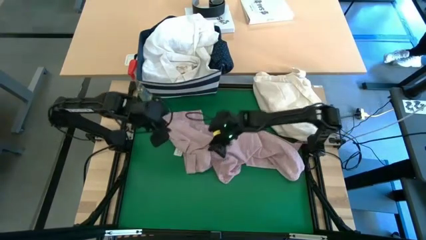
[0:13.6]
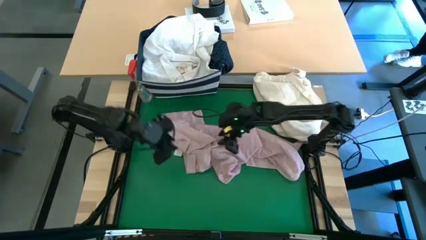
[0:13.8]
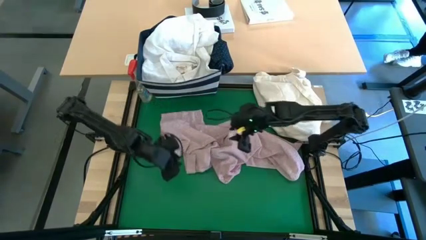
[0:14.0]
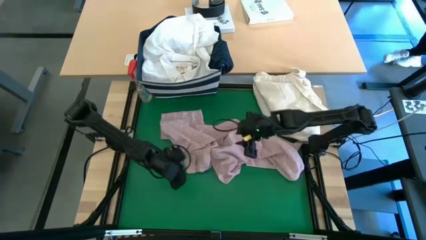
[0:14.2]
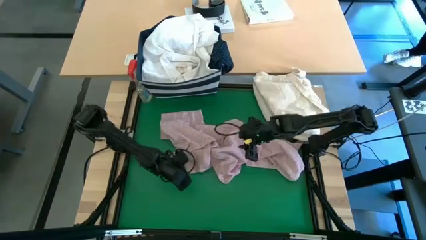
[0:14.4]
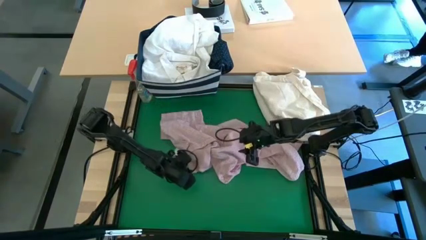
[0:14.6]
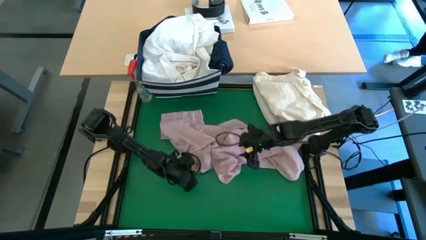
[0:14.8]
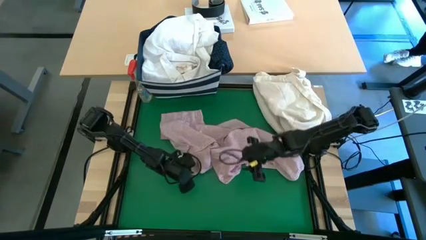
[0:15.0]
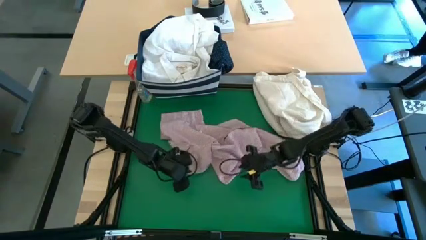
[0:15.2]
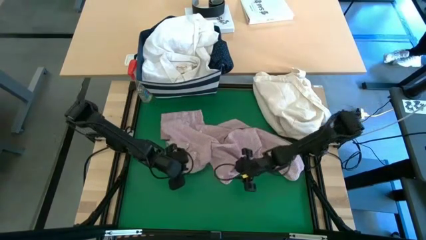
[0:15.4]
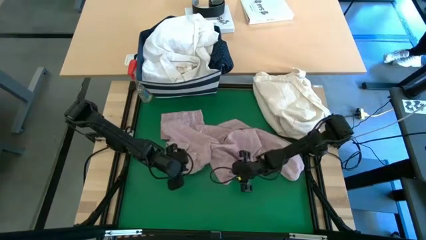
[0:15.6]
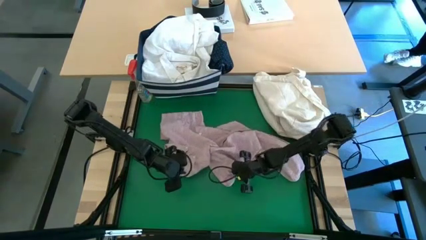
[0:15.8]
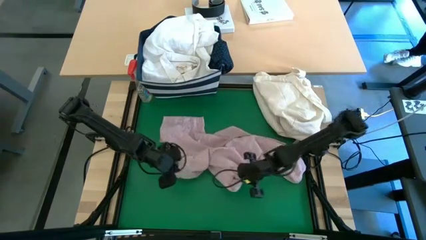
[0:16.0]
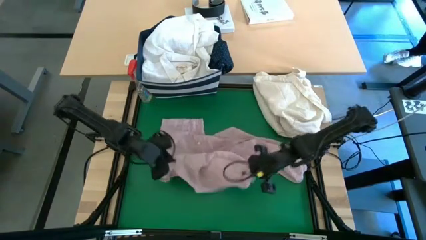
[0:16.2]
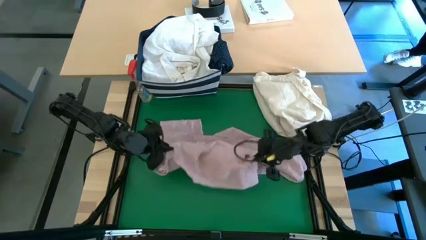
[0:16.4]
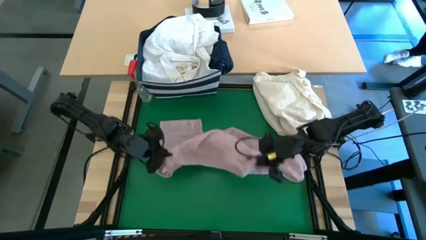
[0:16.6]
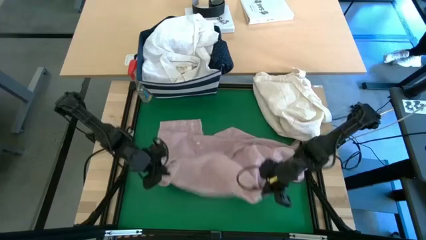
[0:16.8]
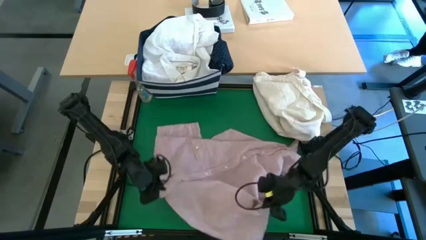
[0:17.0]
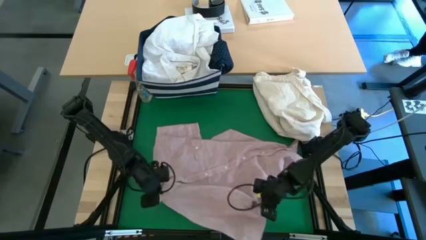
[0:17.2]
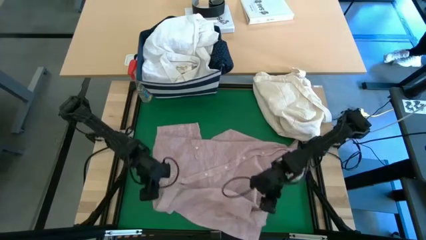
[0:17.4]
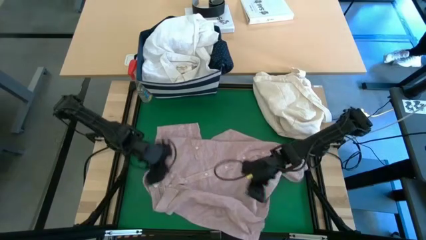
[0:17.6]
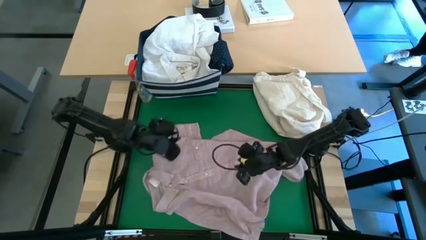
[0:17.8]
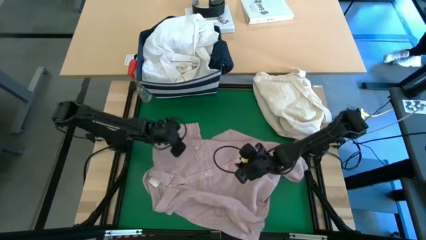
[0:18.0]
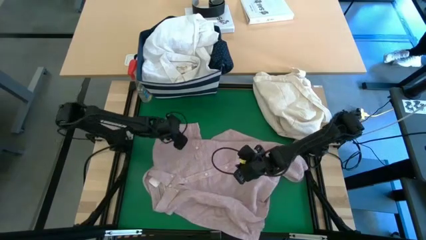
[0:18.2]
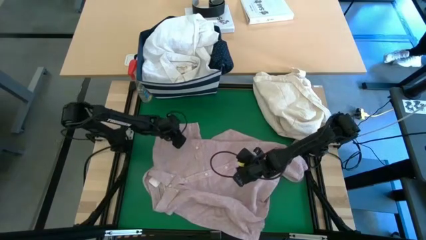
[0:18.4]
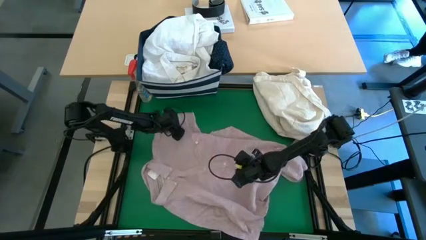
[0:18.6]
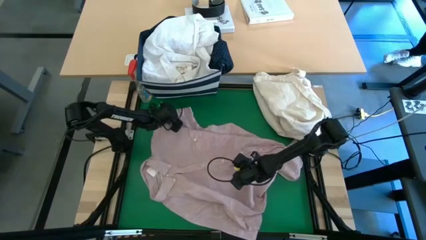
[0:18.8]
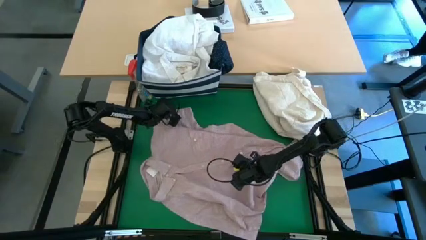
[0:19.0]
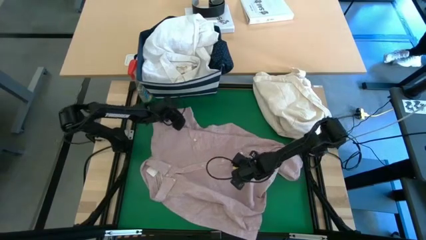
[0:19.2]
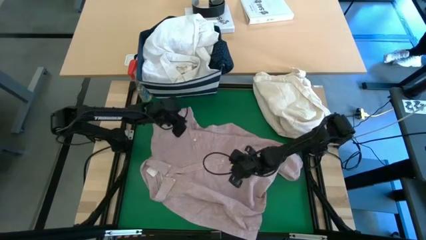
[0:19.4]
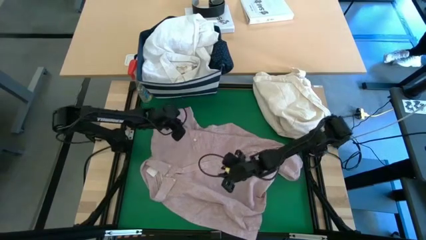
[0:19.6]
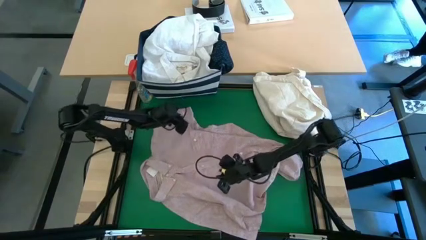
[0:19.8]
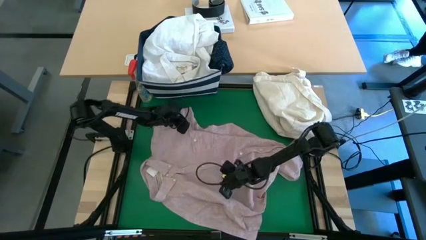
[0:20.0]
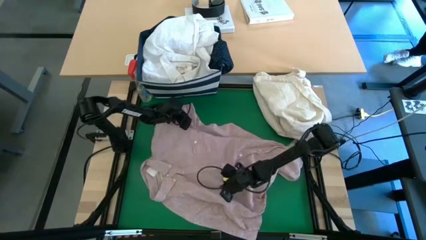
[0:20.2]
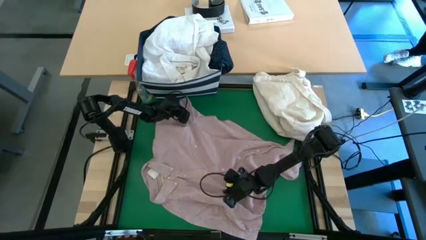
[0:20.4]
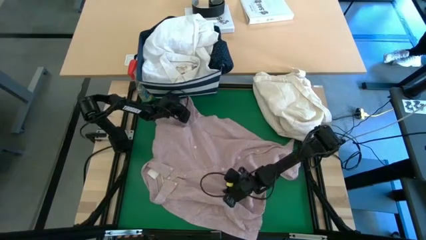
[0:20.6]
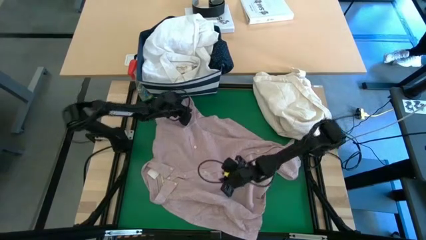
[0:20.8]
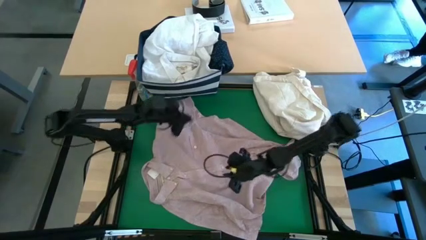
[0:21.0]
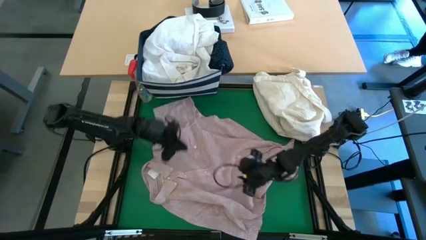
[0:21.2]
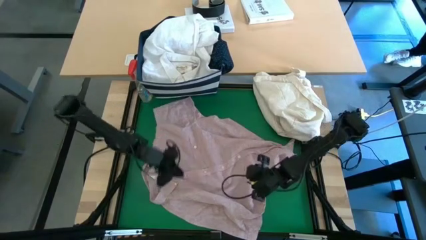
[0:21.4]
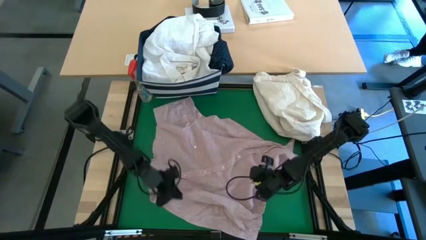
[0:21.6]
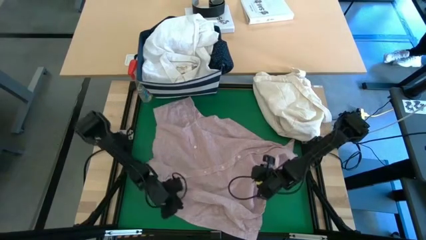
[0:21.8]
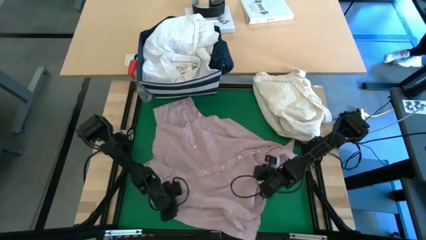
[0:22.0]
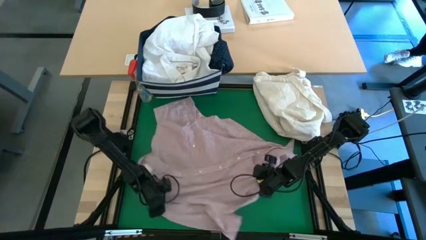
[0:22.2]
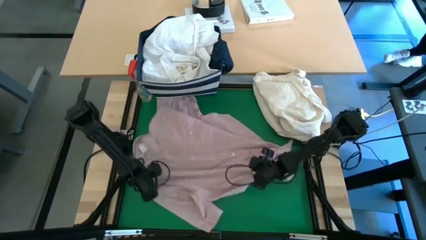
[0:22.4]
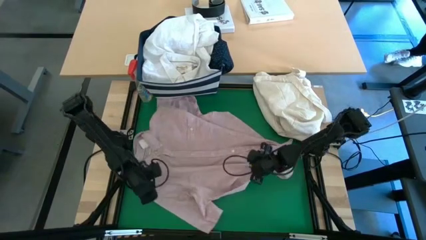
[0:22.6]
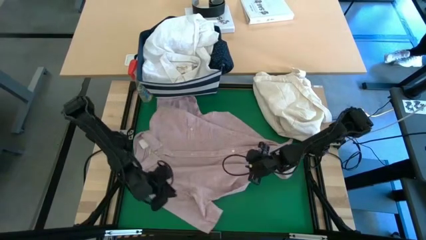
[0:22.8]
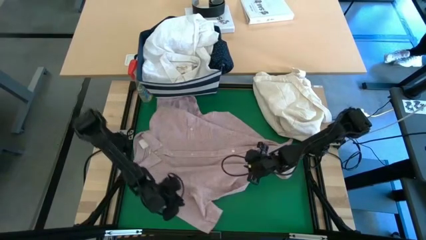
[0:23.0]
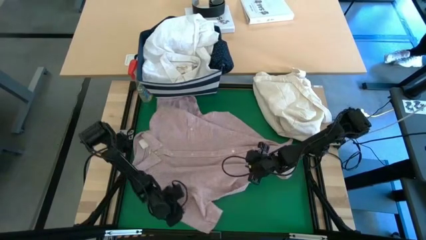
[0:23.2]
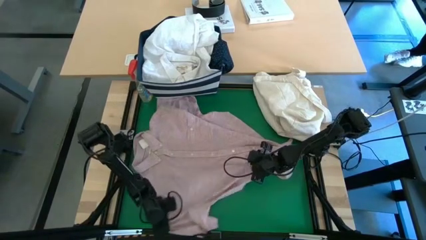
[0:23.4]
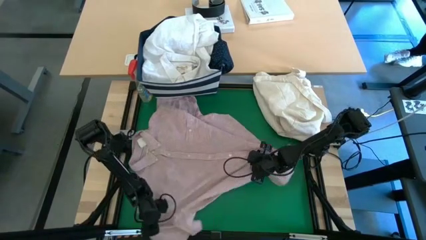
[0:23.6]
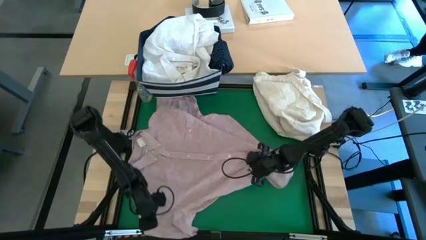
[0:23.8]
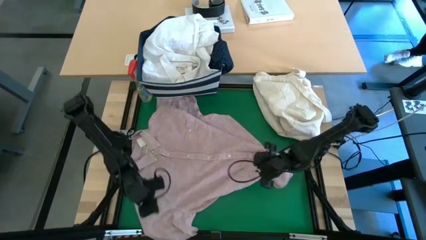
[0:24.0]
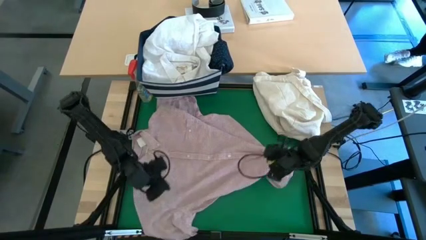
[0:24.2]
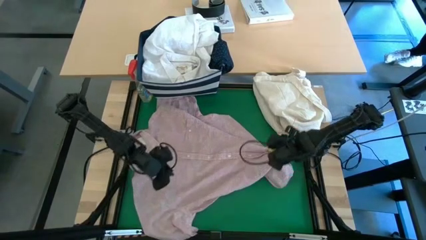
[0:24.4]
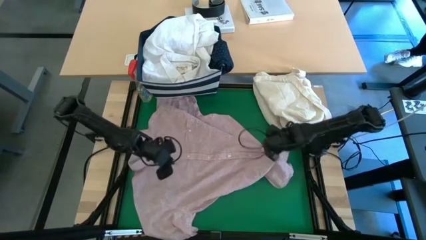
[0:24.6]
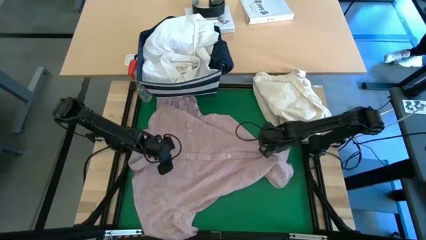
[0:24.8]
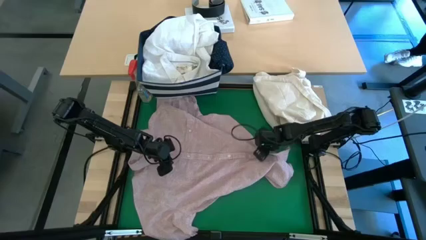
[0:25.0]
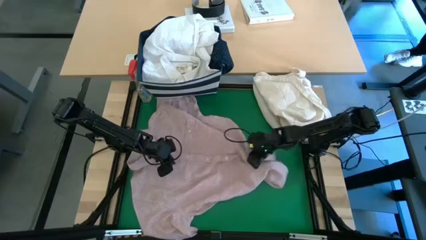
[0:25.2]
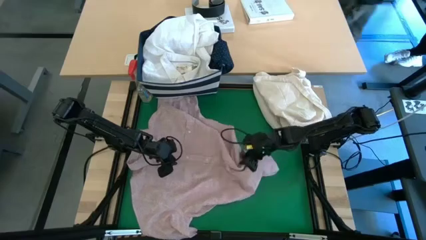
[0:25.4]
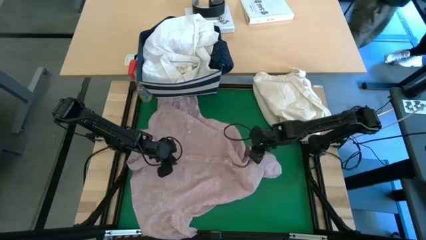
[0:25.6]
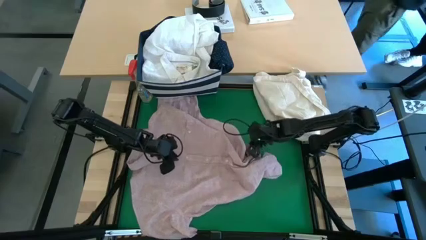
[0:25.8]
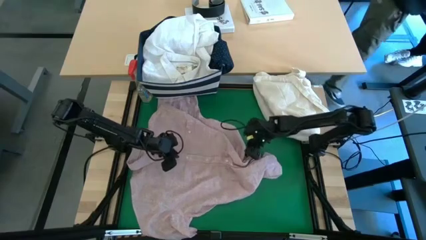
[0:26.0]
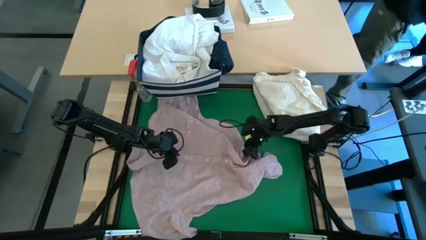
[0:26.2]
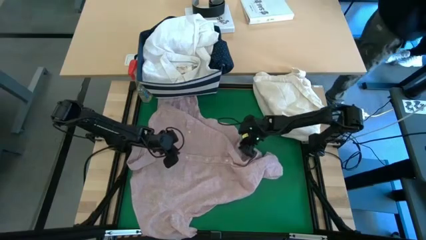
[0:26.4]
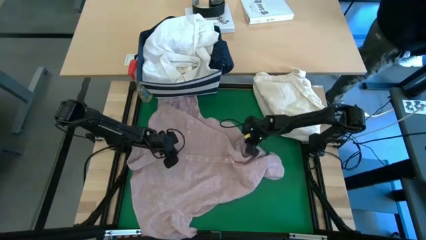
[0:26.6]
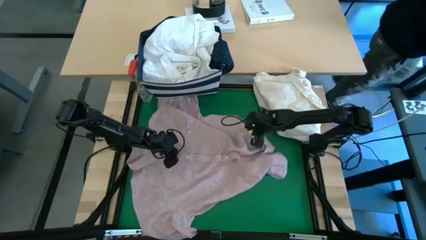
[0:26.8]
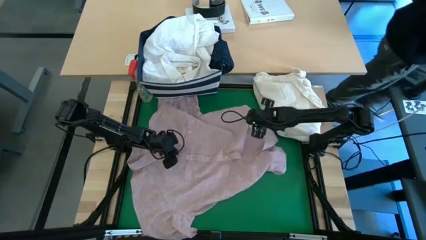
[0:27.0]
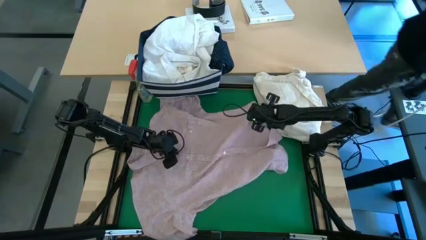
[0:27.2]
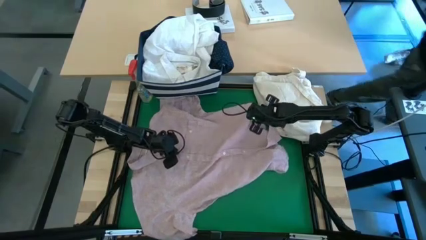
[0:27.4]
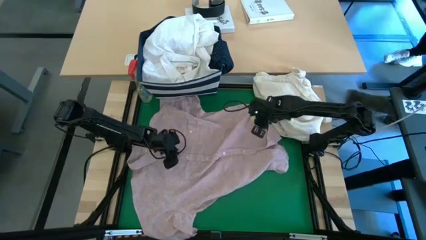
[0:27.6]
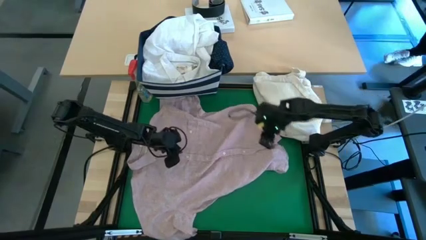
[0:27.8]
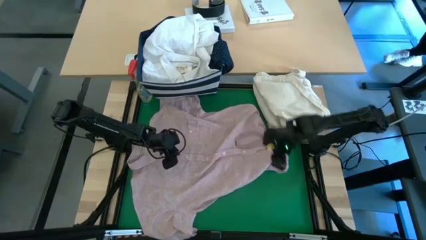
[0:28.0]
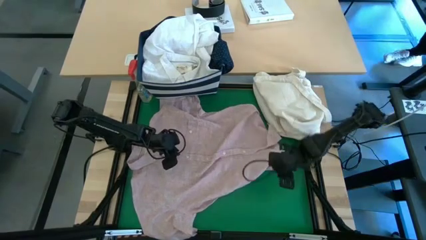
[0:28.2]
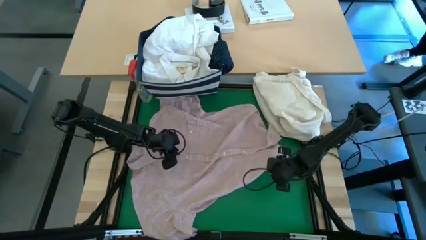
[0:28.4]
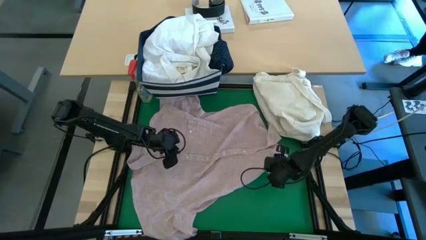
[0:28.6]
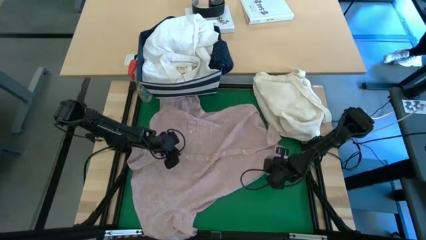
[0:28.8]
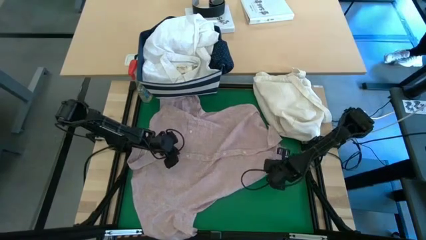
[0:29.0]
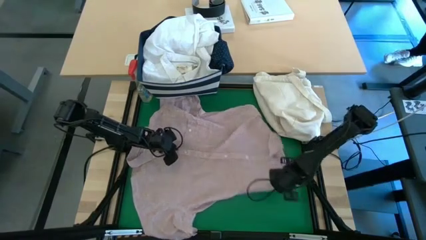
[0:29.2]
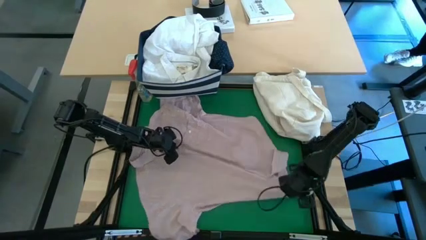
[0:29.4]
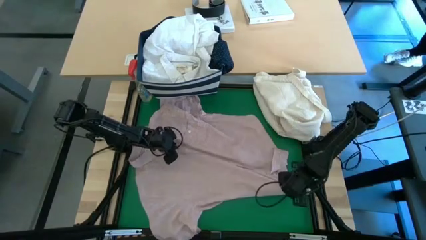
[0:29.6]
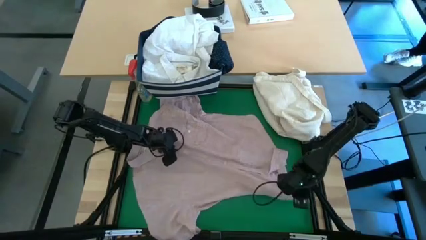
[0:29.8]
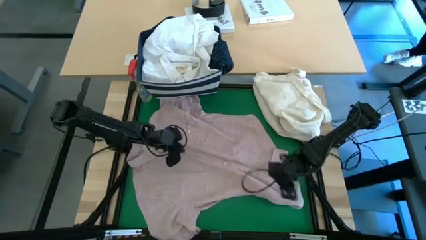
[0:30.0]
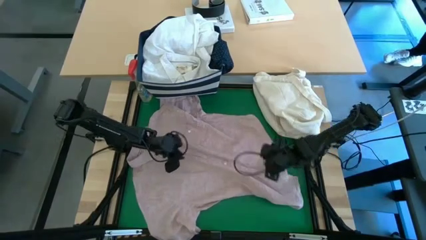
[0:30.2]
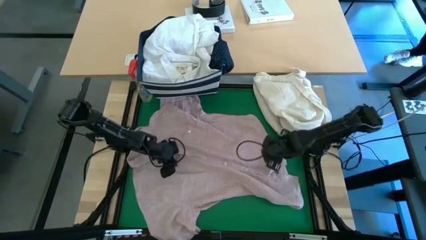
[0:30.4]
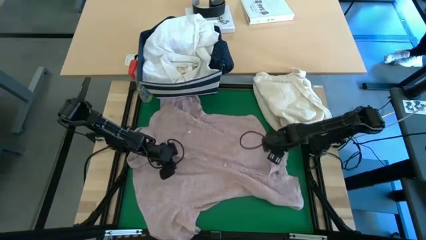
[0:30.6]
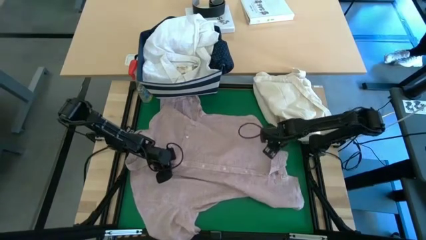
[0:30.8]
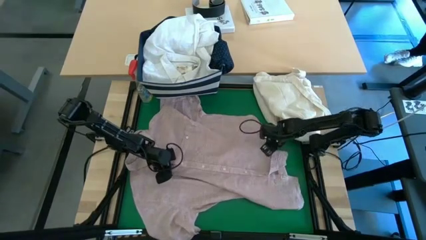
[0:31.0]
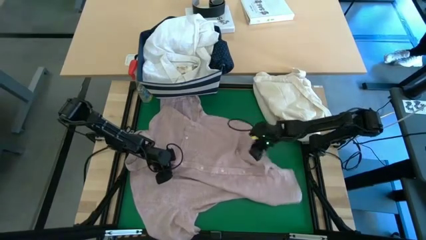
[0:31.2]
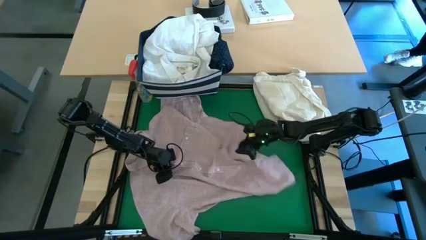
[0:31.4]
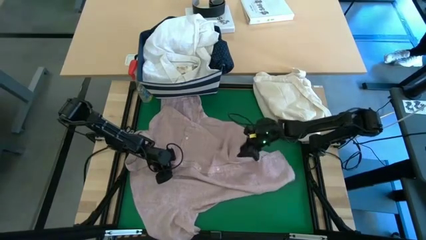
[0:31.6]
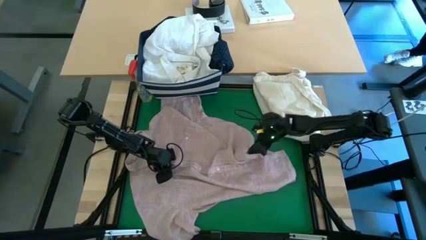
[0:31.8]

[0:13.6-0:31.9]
Task: Fold laundry
Fold the red polo
